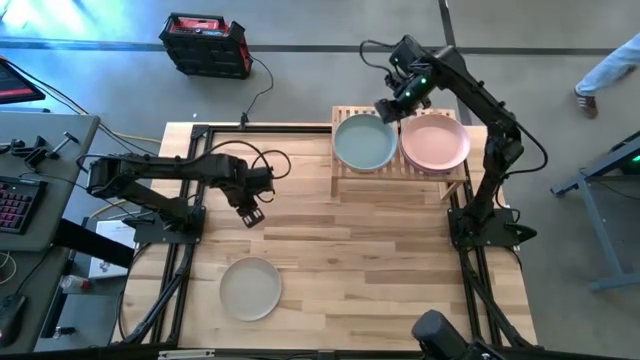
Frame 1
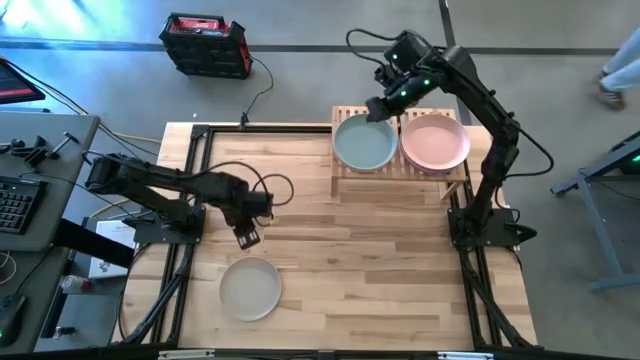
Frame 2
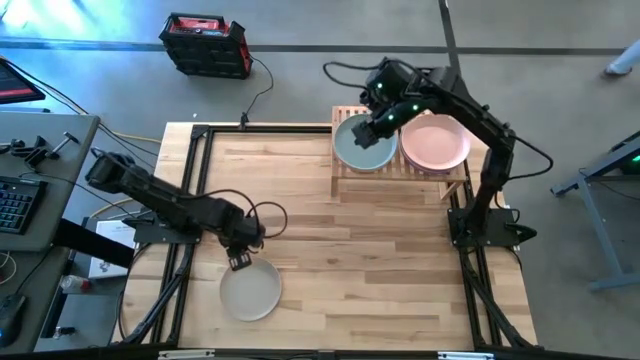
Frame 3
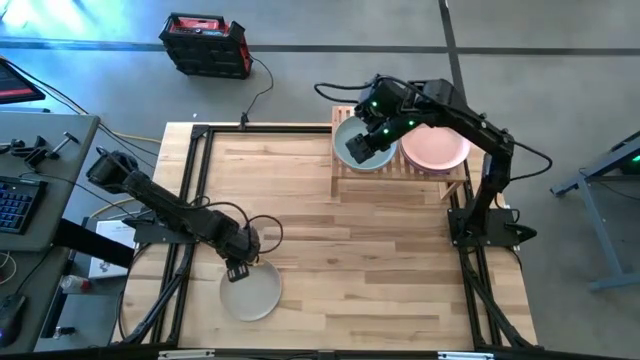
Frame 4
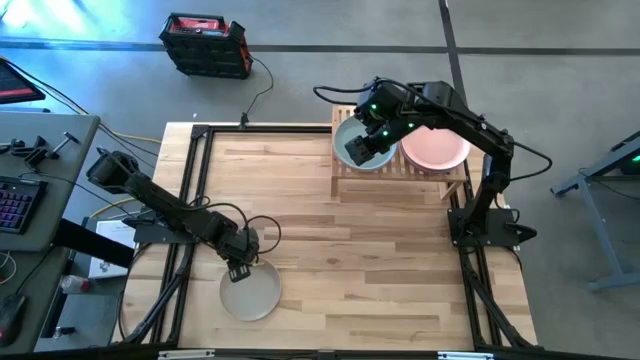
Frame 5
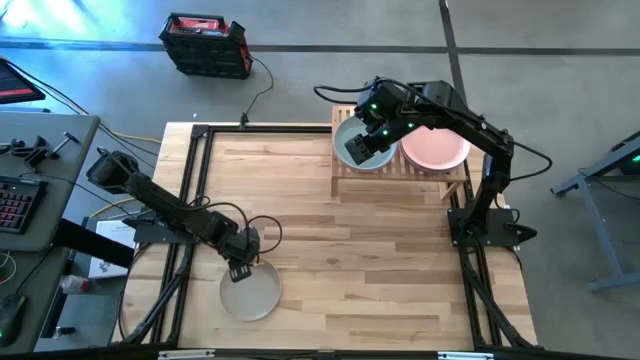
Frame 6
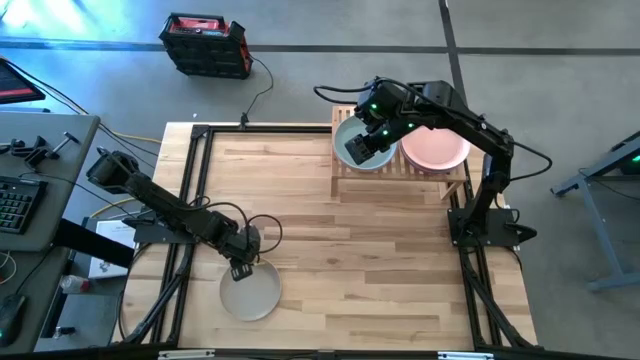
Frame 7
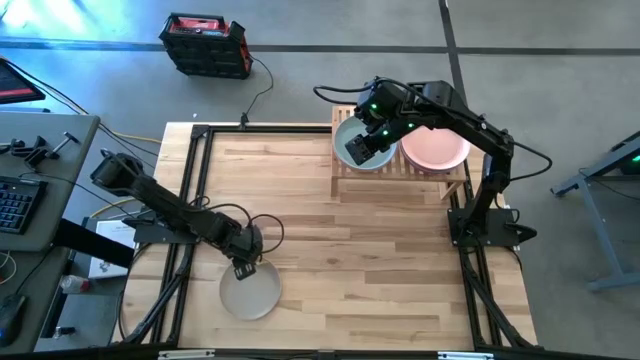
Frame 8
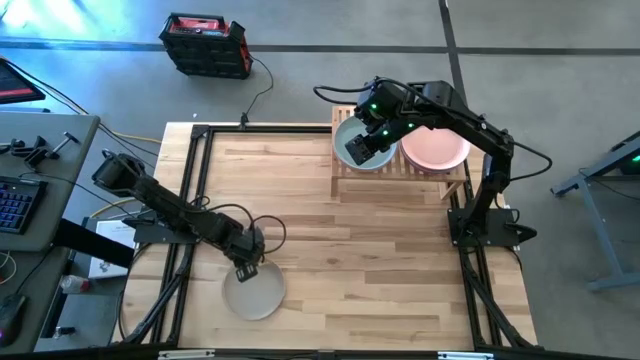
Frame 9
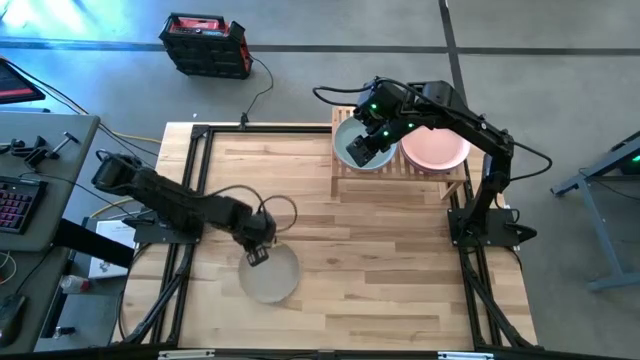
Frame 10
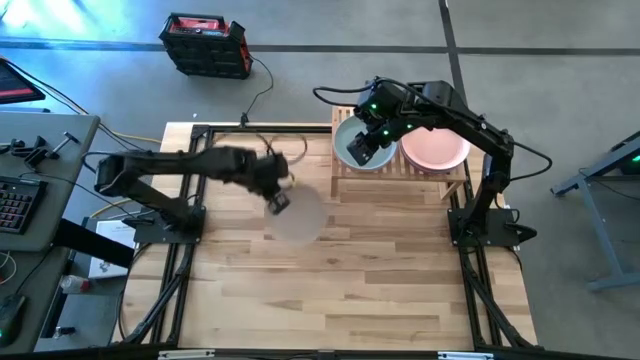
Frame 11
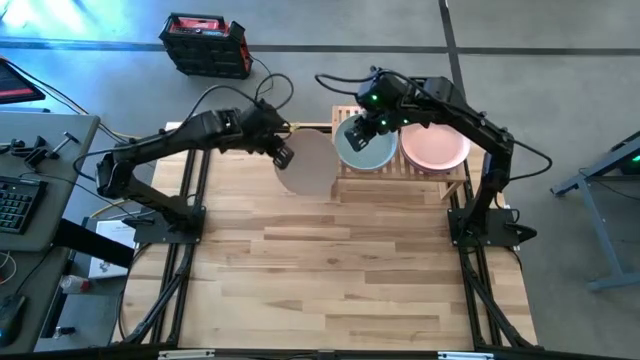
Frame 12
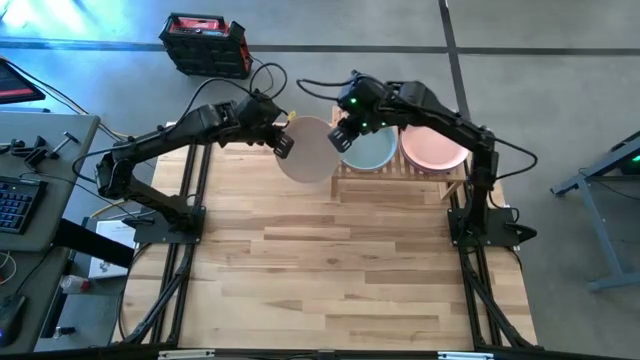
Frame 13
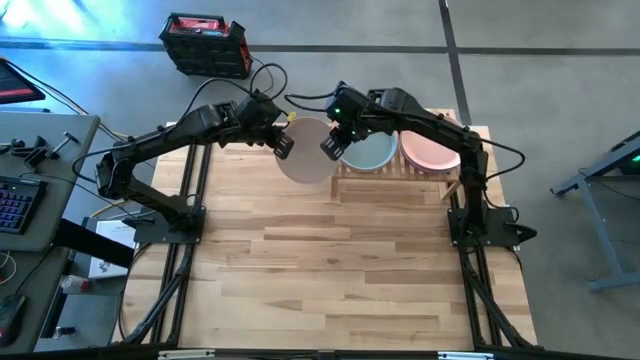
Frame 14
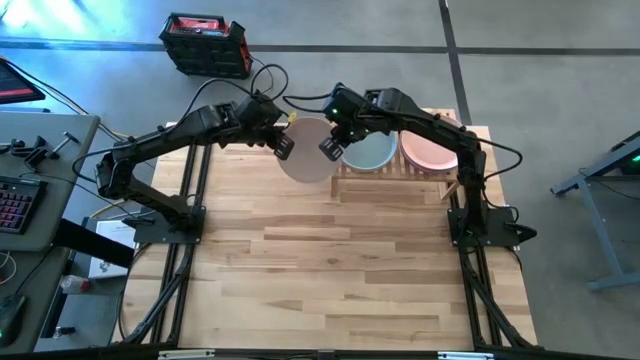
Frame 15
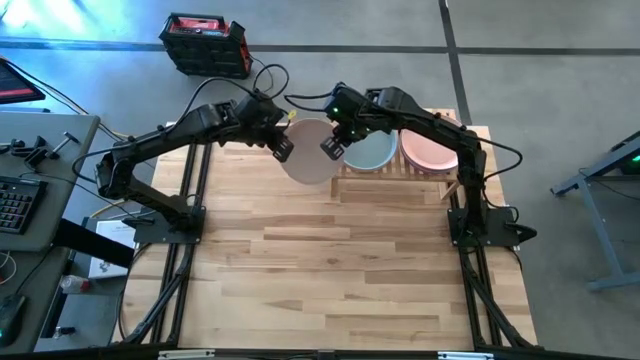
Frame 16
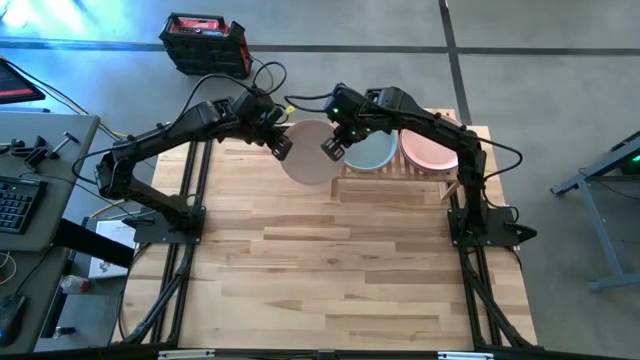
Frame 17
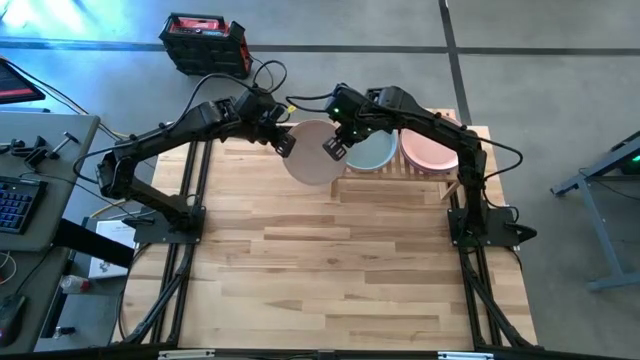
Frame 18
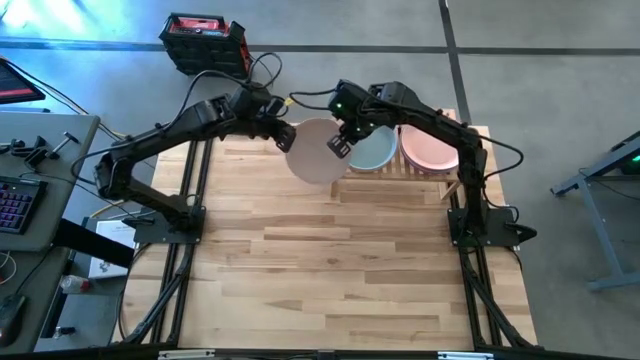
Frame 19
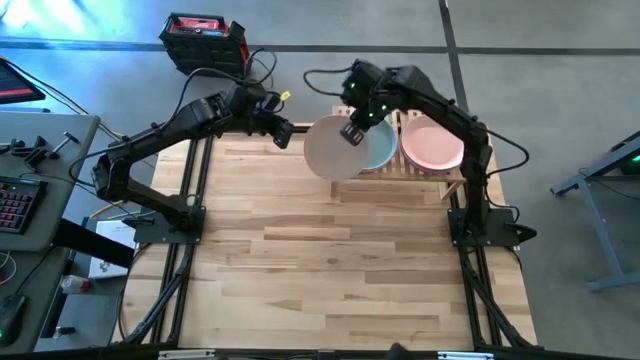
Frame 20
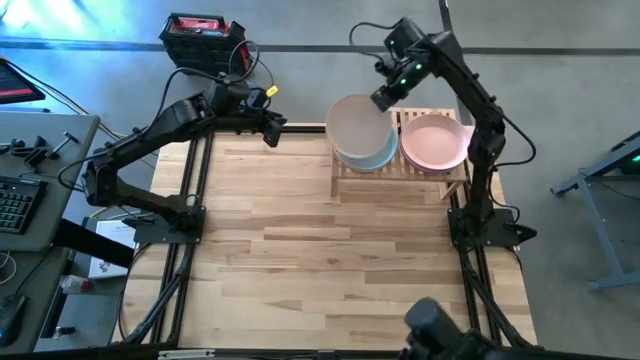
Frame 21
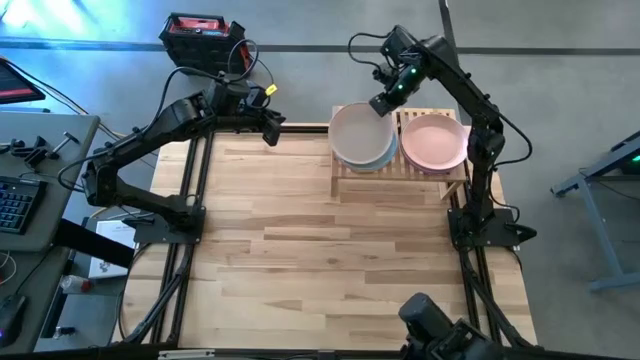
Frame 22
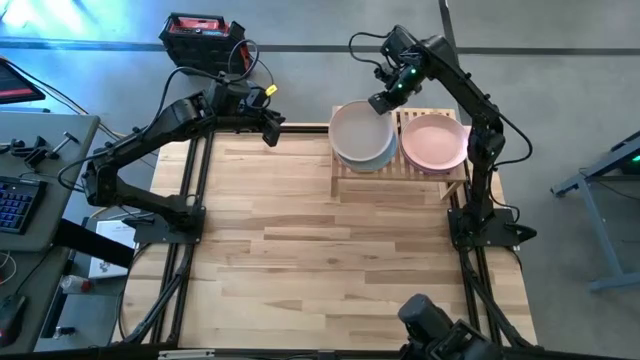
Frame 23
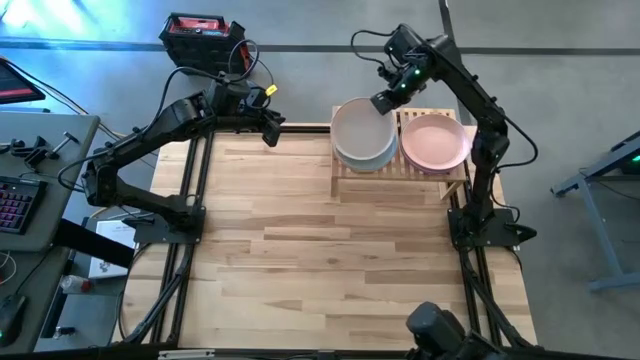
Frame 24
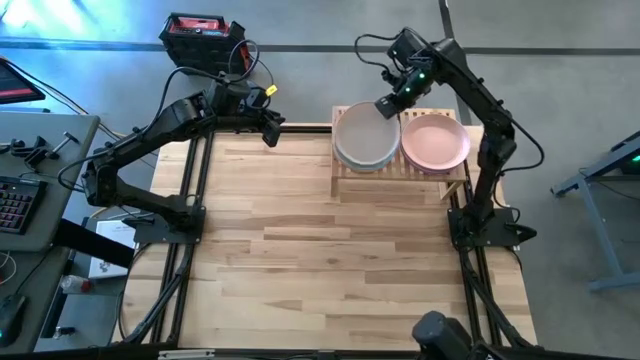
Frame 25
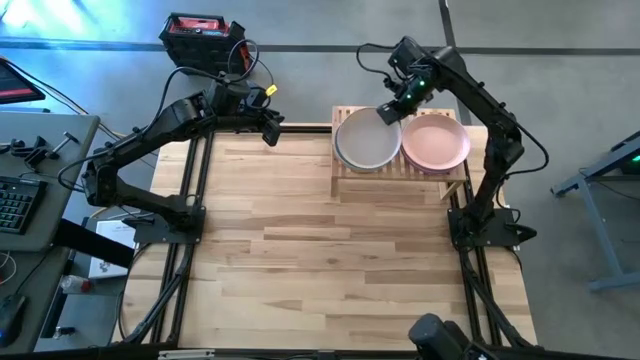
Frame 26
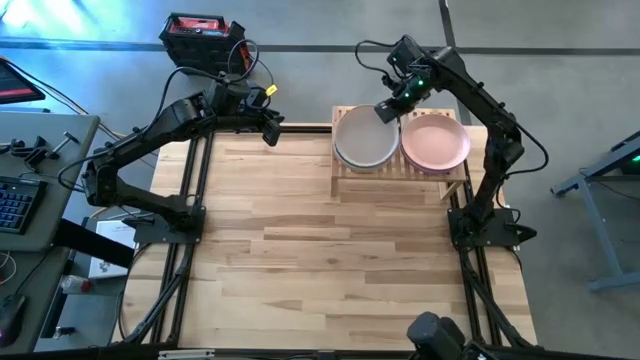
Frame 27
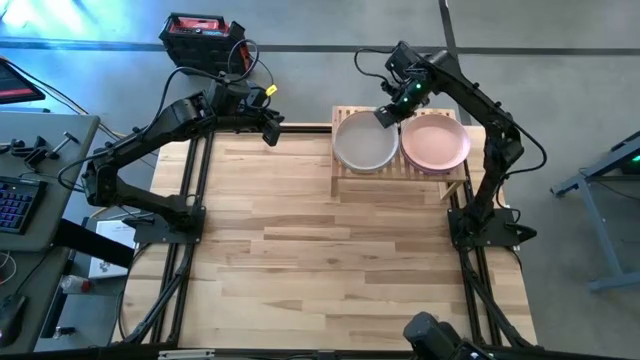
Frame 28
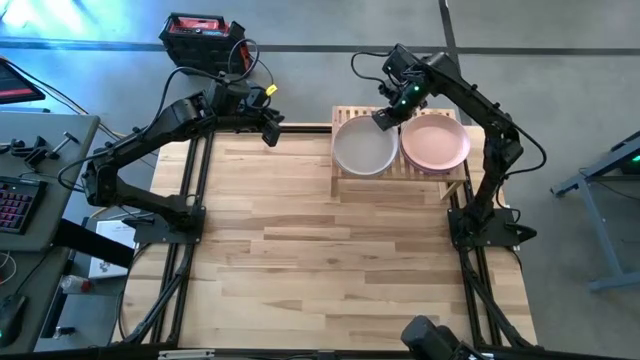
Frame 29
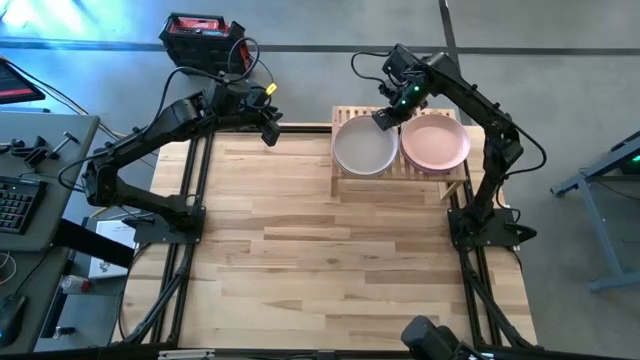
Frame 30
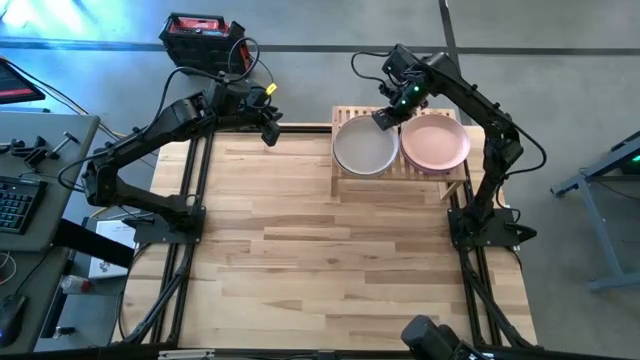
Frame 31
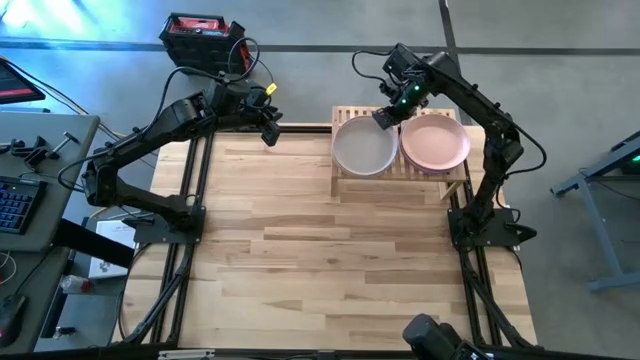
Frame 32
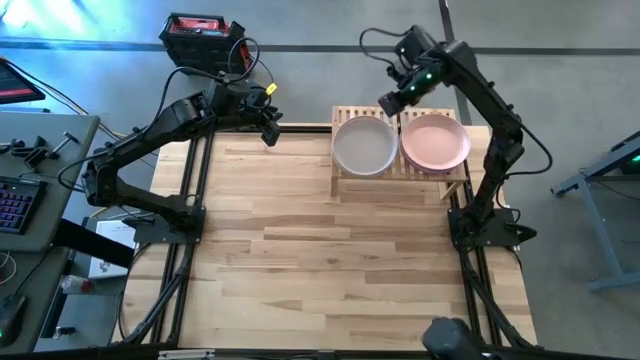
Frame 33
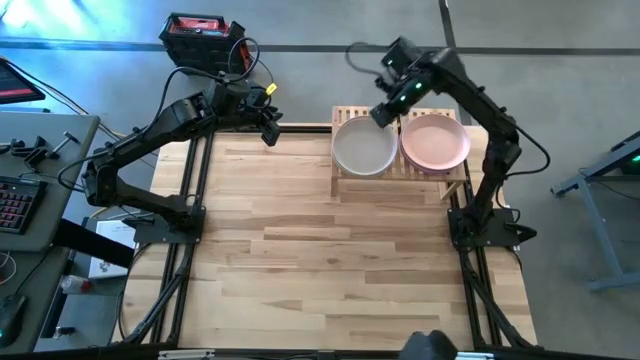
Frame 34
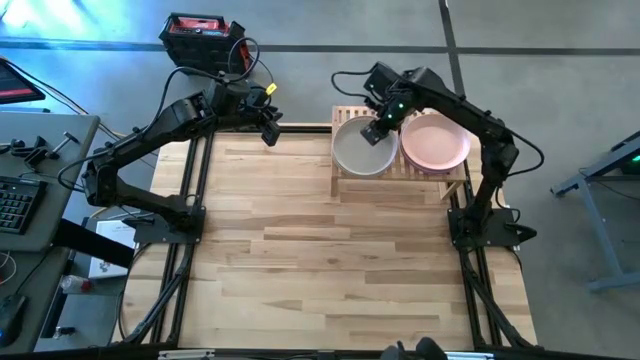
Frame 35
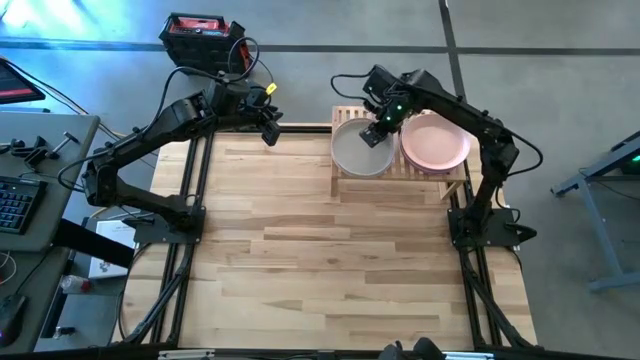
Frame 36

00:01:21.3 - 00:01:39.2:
Task: Place and stack plates onto a shelf
Stack the gray plate on top of the blue plate on the shelf

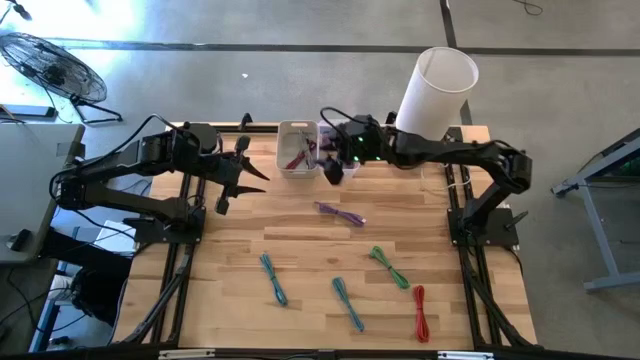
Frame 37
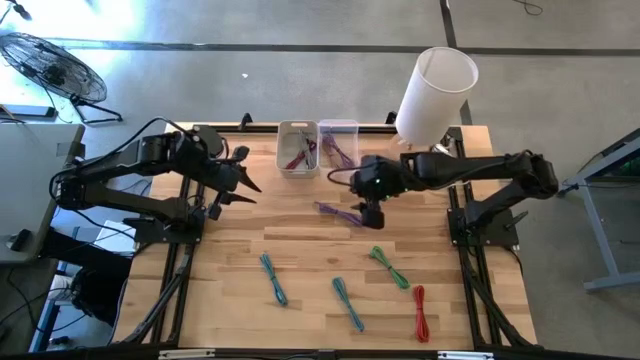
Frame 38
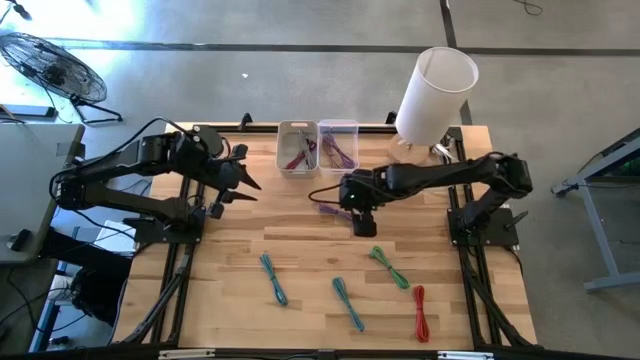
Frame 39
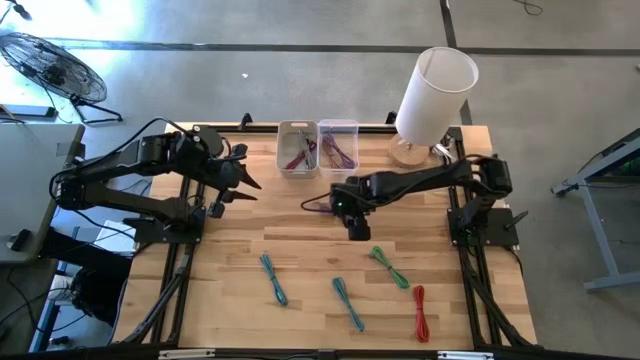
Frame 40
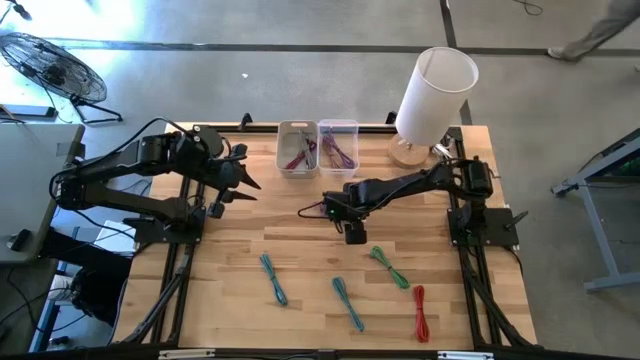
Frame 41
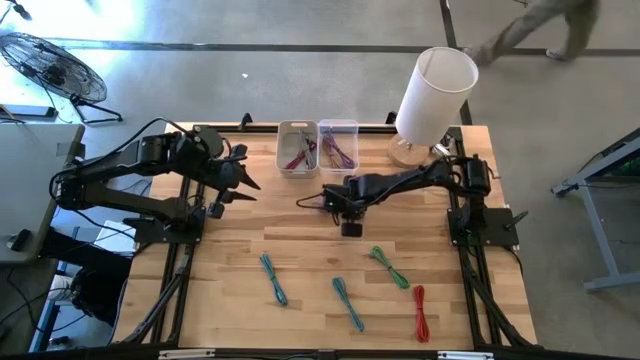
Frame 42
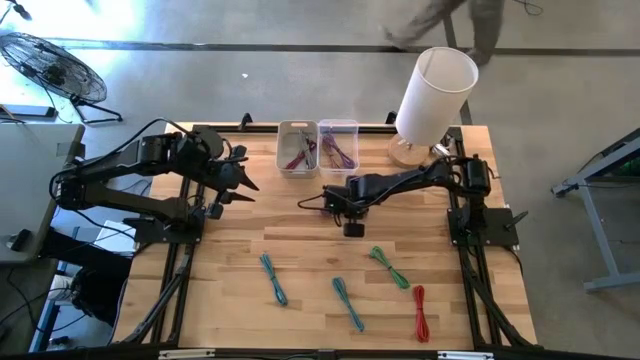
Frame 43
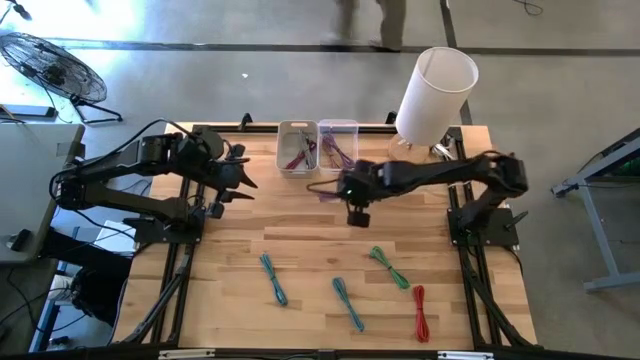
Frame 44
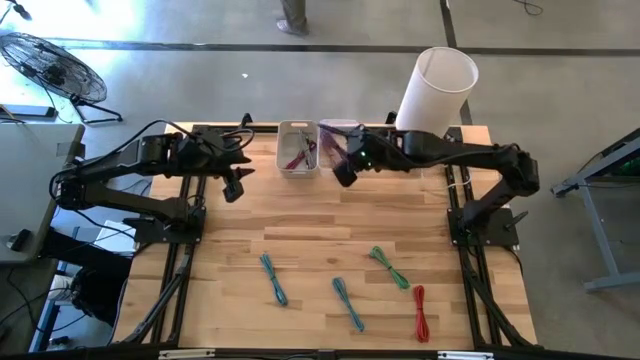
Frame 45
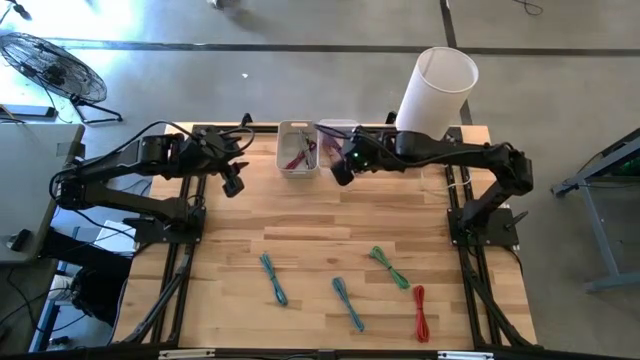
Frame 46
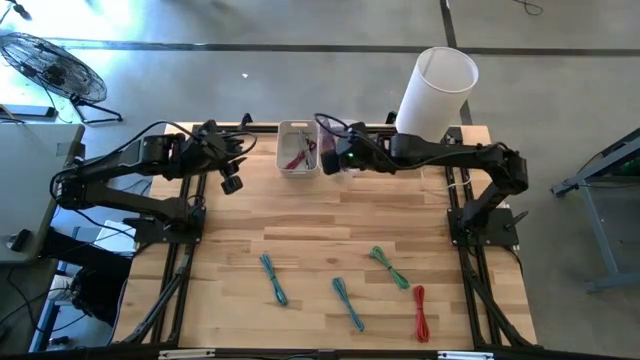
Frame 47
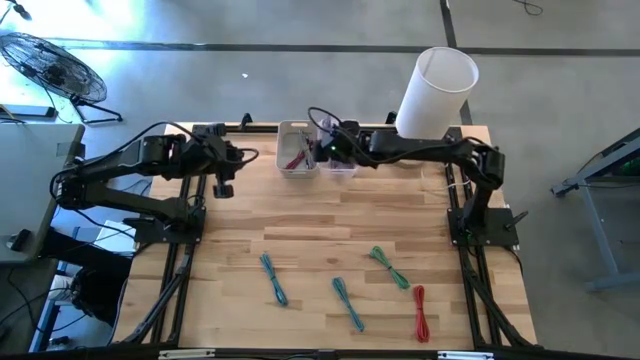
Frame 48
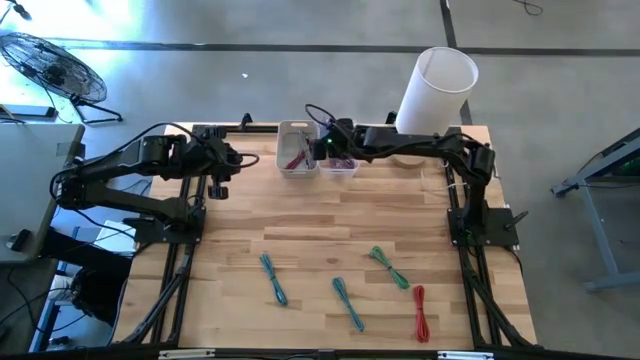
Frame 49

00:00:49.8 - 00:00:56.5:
Task: Pick & Place USB Port
Put the violet USB cable into the transparent bin
